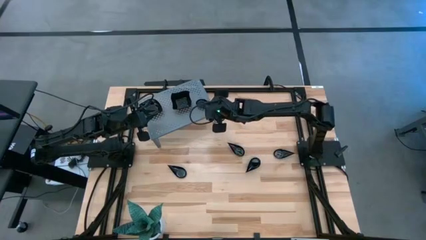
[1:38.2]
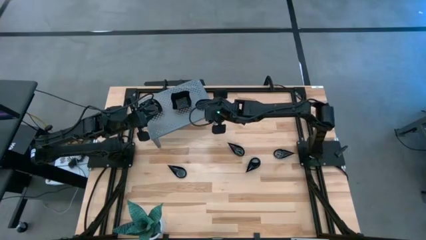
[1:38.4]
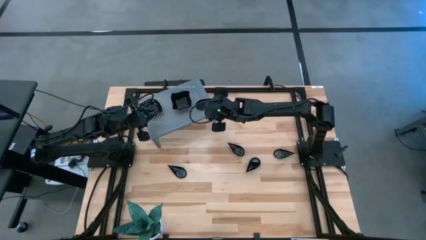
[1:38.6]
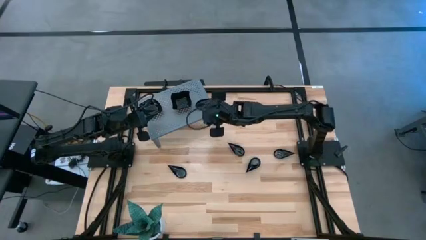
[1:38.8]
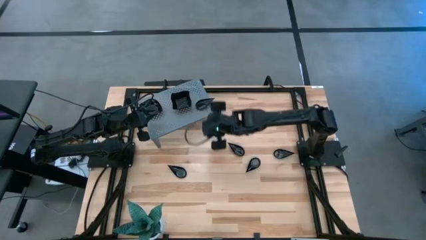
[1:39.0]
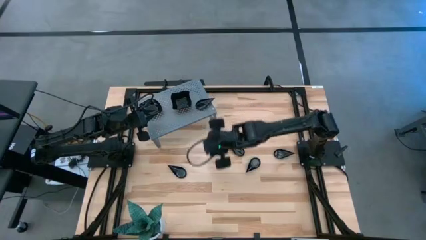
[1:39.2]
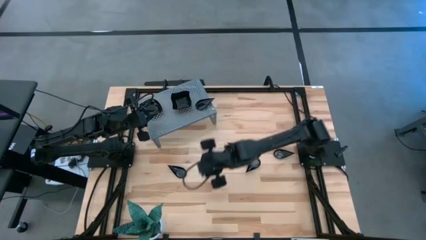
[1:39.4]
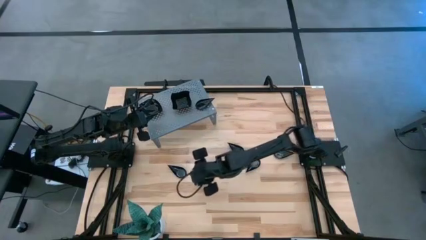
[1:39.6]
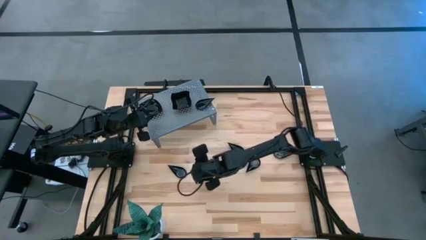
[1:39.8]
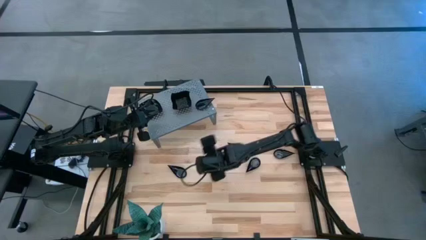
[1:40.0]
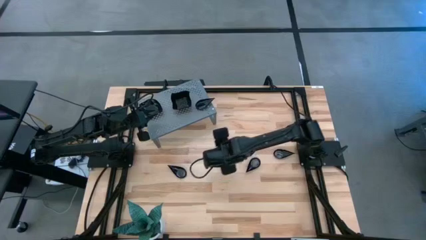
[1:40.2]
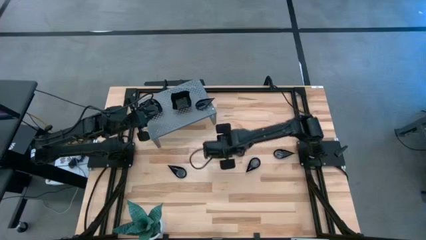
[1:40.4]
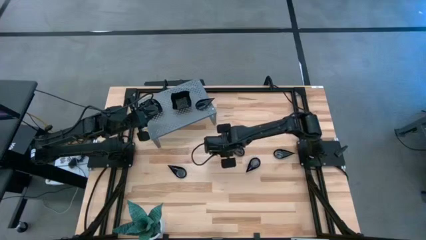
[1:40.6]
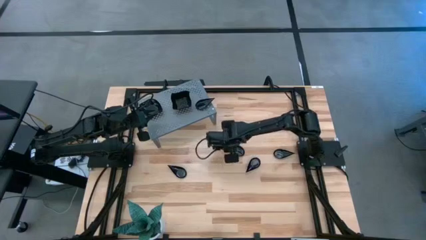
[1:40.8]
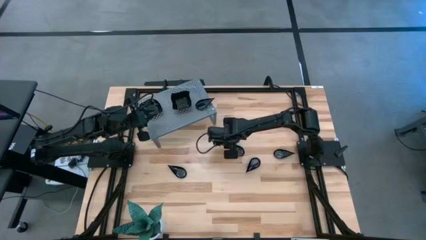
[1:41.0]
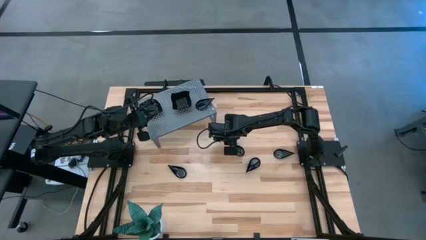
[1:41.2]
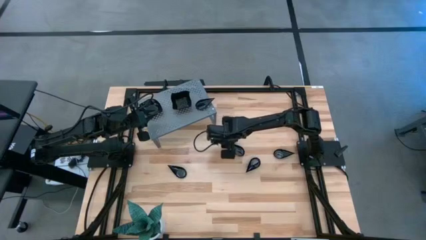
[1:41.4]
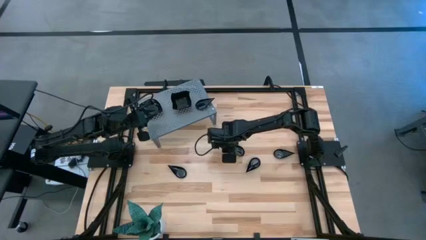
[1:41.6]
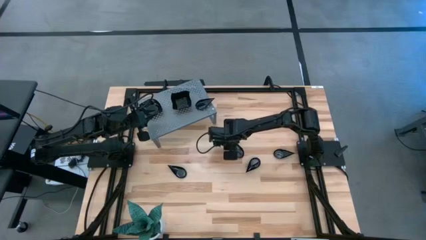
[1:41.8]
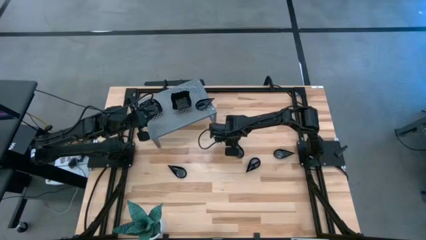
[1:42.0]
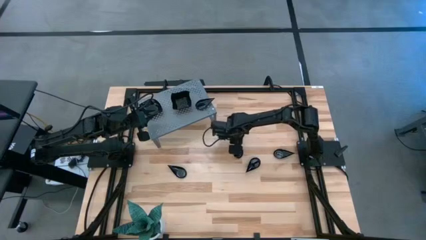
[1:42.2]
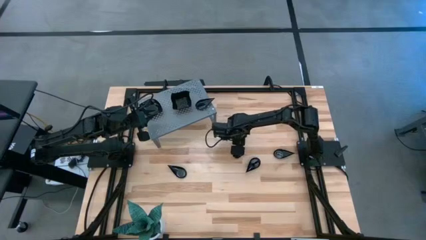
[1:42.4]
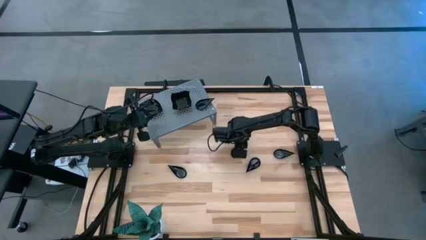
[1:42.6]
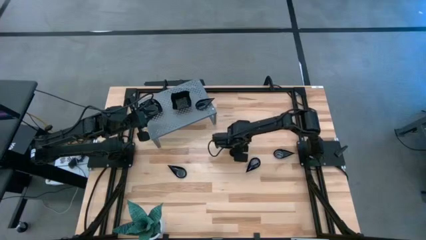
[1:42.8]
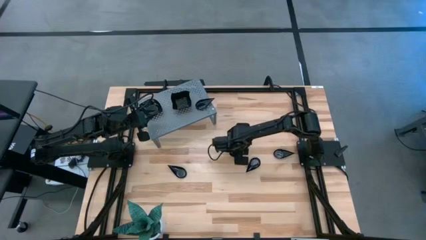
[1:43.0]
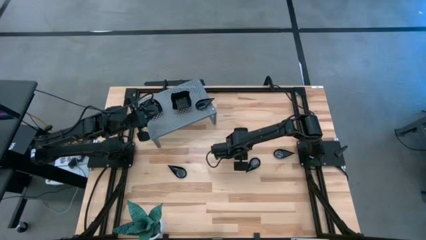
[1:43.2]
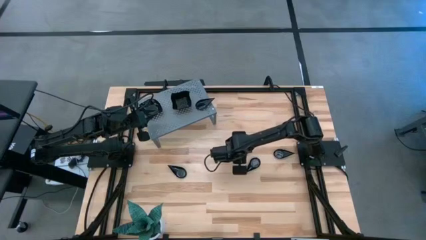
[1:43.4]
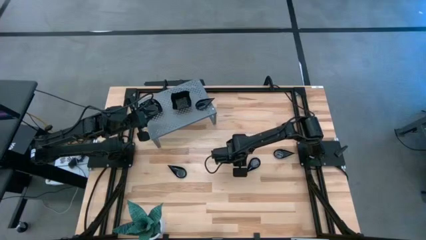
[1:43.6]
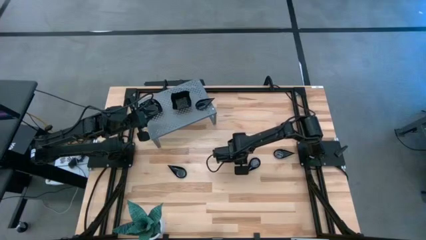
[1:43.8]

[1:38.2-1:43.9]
Task: Pick & Place Mini shaped plates
Stack the black drop-shaped plate on top of the black drop-shaped plate on the shelf

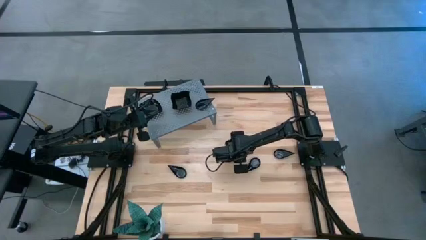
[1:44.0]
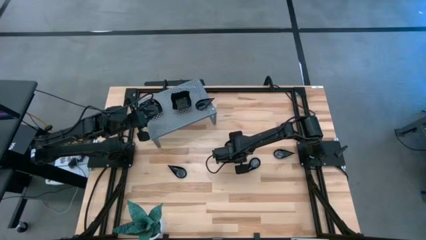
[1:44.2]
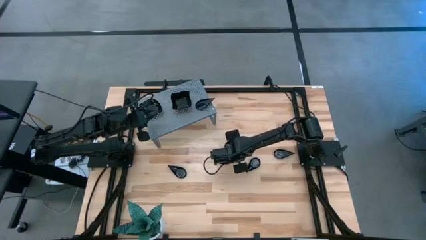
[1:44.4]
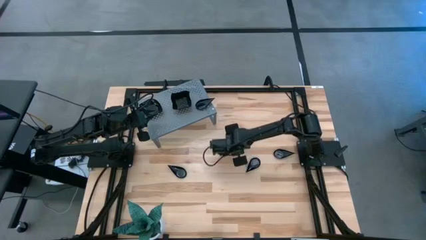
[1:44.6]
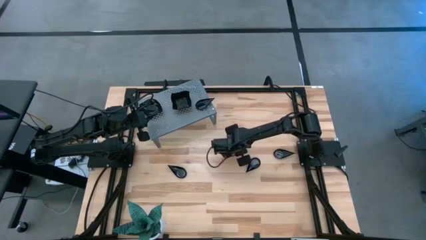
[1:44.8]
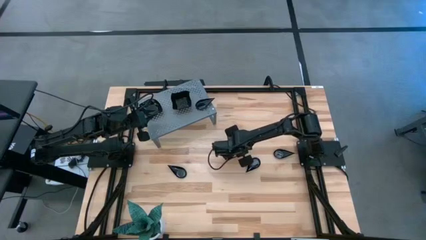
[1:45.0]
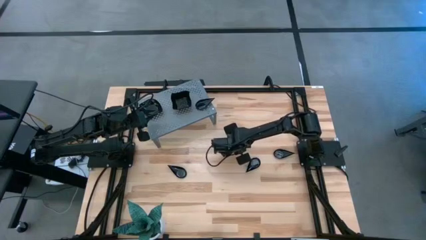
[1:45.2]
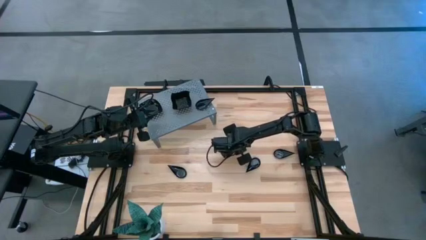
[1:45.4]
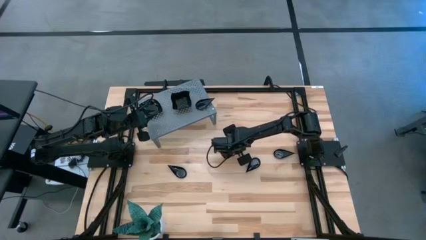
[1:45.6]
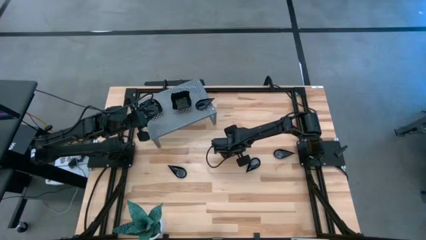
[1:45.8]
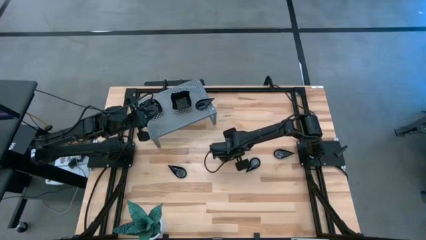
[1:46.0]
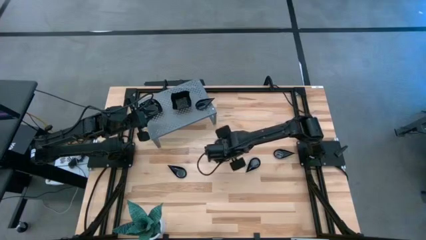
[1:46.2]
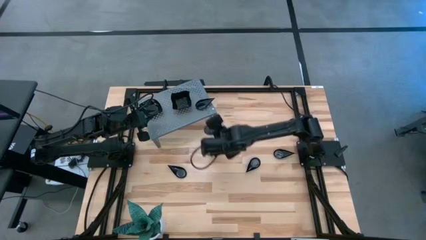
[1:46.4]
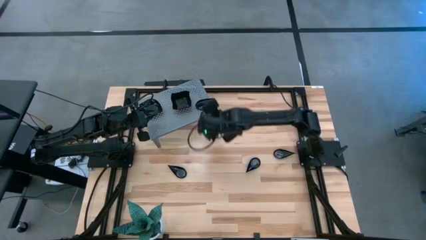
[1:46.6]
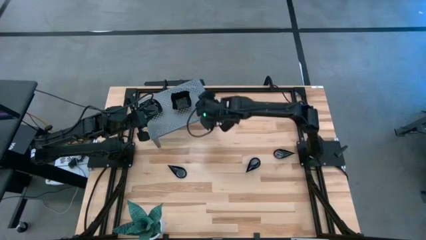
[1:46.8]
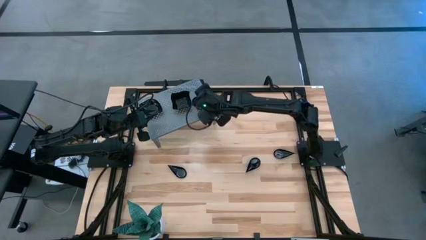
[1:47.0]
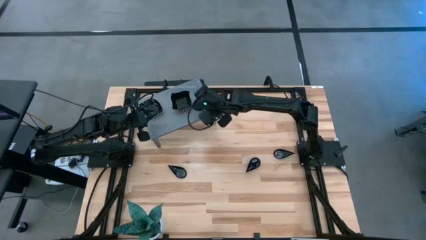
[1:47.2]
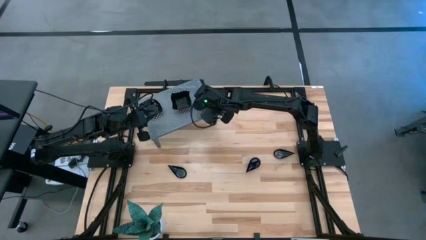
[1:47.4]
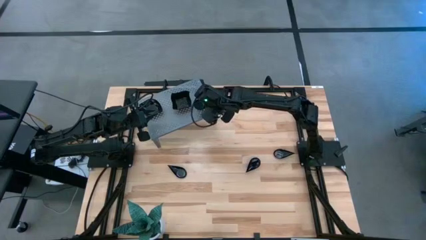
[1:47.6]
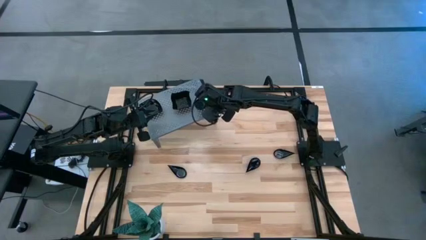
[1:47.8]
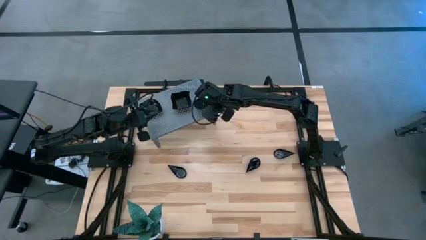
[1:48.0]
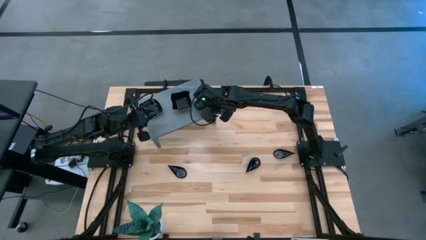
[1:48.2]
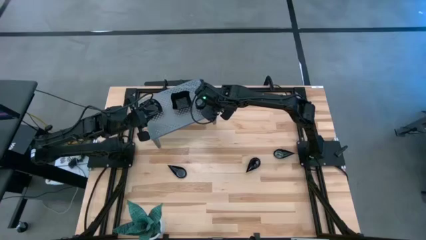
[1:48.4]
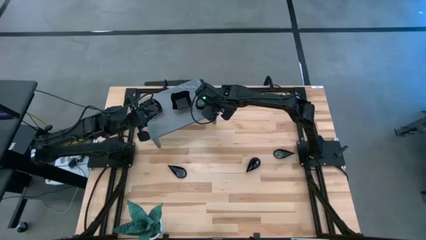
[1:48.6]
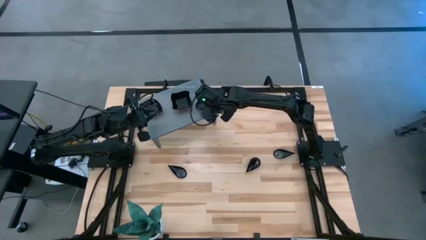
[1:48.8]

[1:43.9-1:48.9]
Stack the black drop-shaped plate on top of the black drop-shaped plate on the shelf

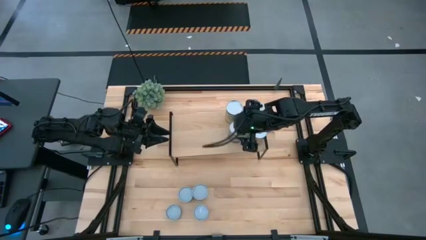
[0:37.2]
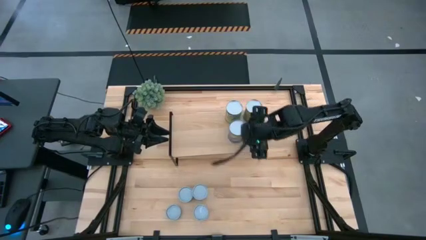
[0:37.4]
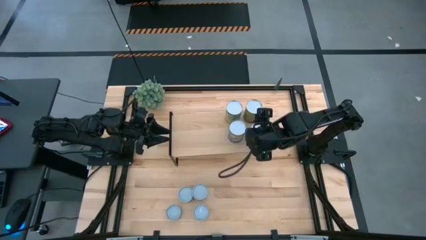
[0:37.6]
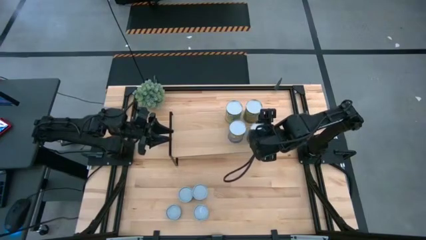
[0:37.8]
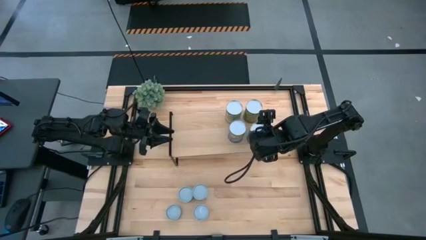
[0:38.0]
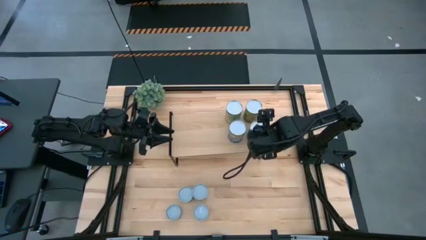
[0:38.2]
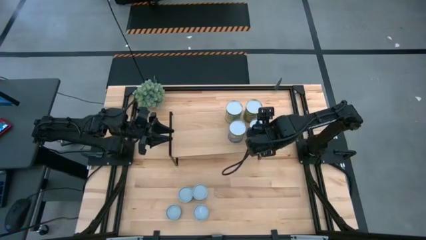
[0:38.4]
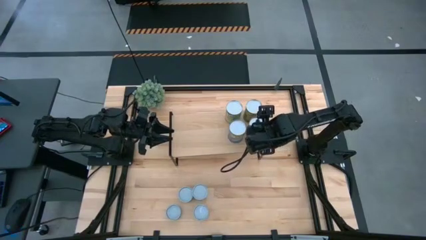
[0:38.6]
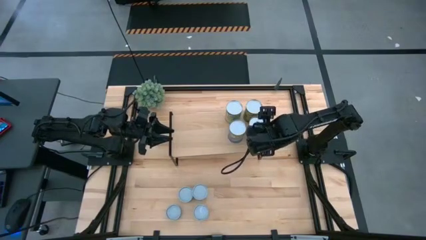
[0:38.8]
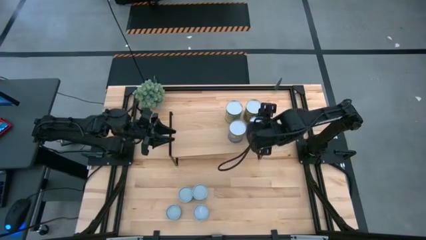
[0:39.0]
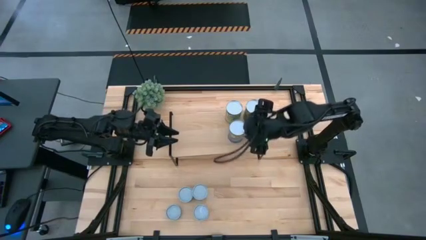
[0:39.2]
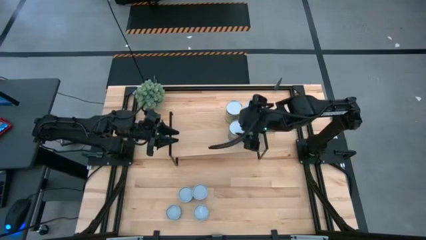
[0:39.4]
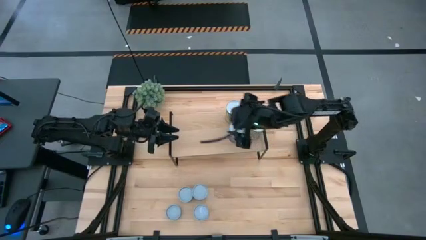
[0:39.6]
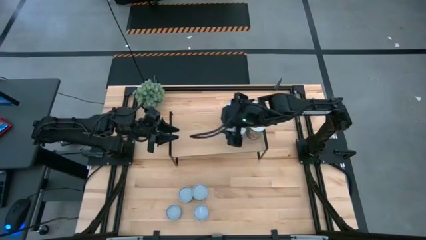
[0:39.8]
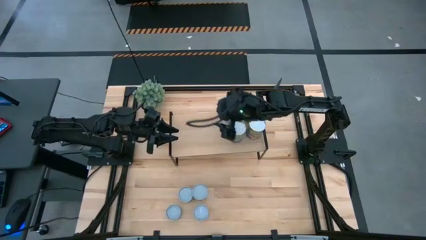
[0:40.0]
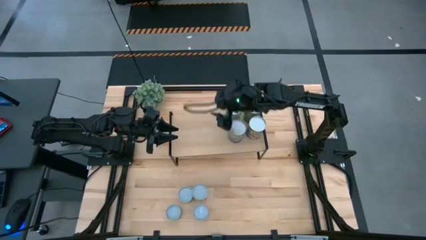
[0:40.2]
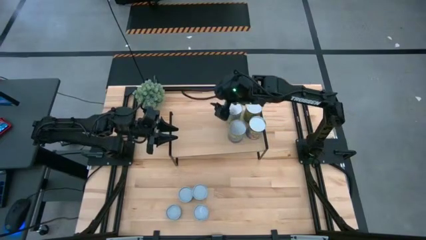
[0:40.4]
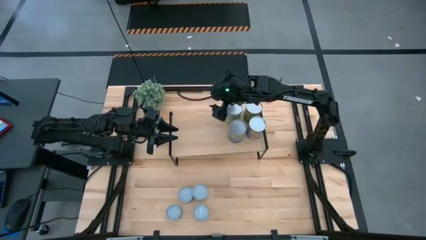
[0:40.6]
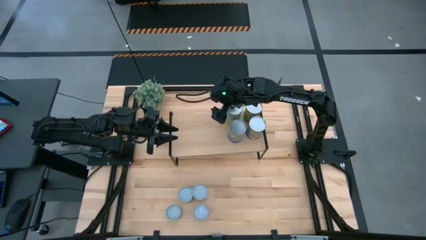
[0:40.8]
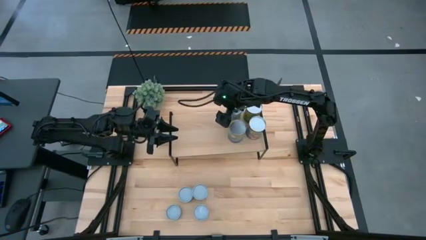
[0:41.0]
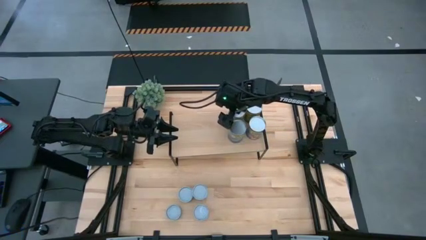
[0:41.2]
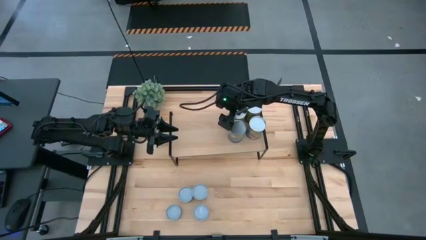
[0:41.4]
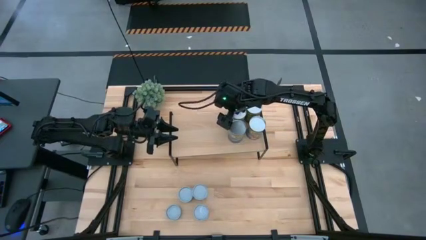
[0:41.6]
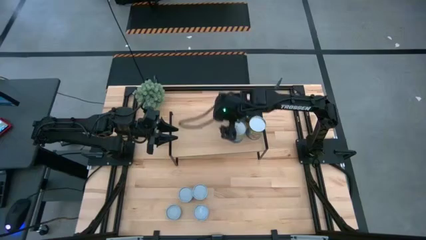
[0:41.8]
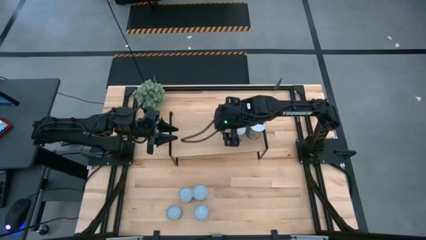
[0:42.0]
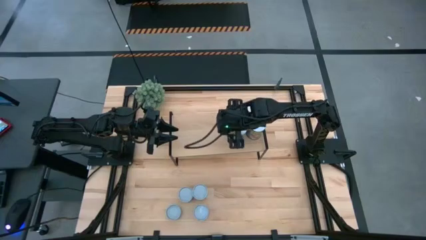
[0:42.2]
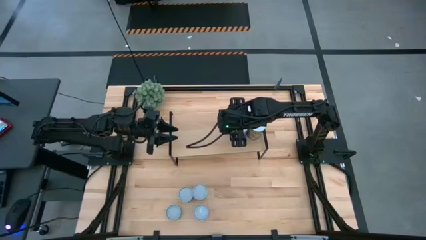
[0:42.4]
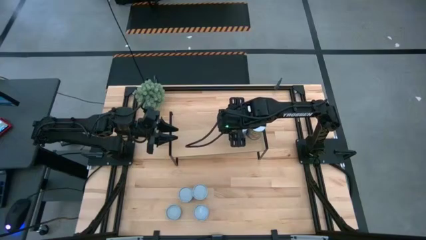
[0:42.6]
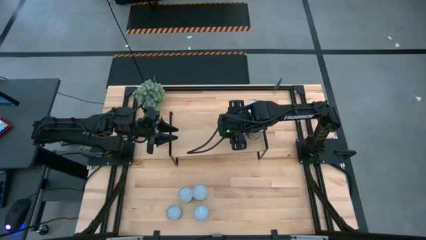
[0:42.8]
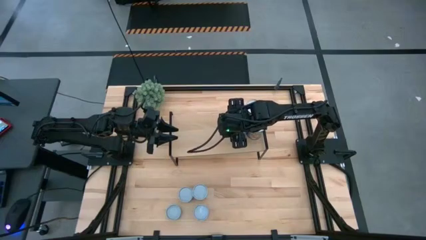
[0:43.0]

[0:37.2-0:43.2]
Task: Pick and place cans onto a shelf
Adjust the right blue can on the shelf
